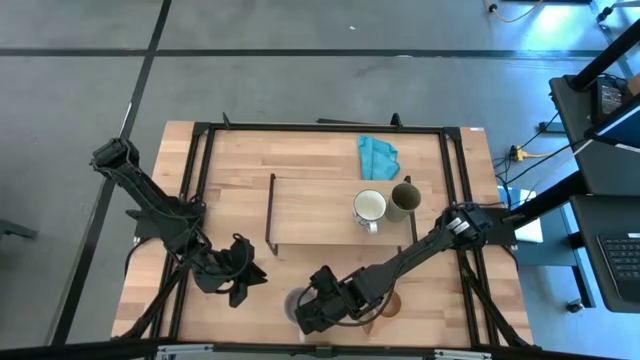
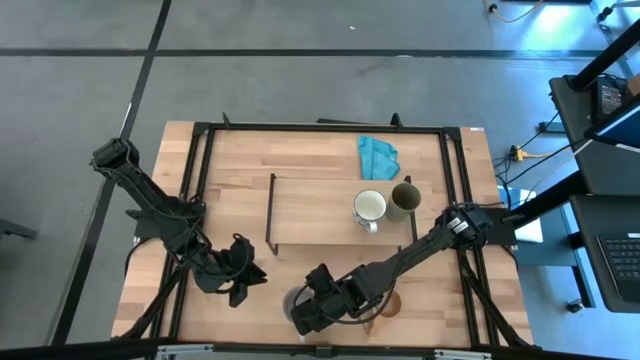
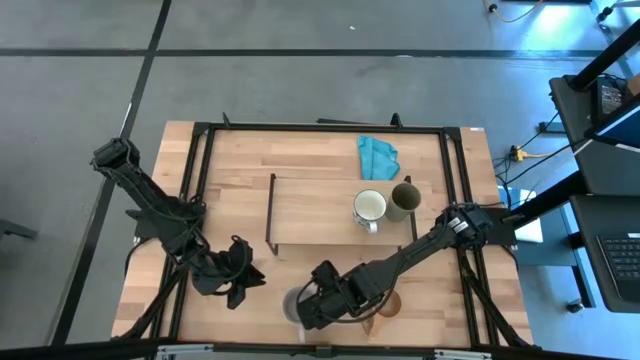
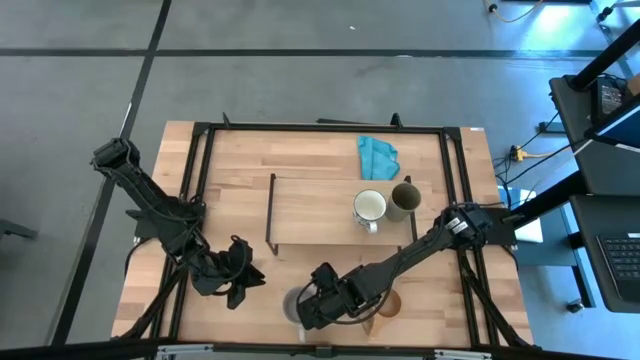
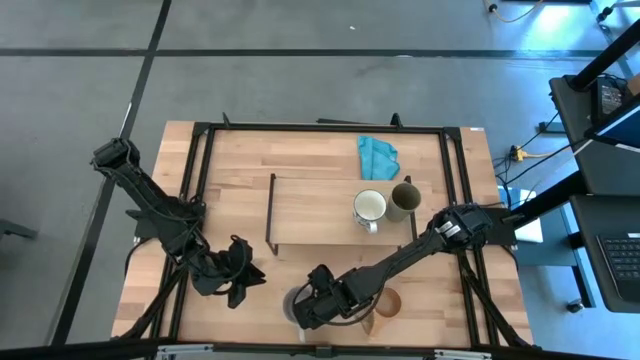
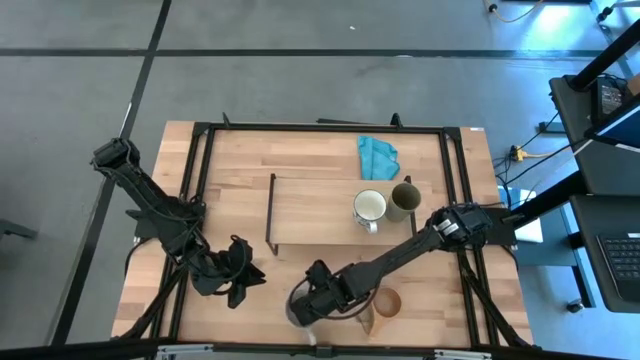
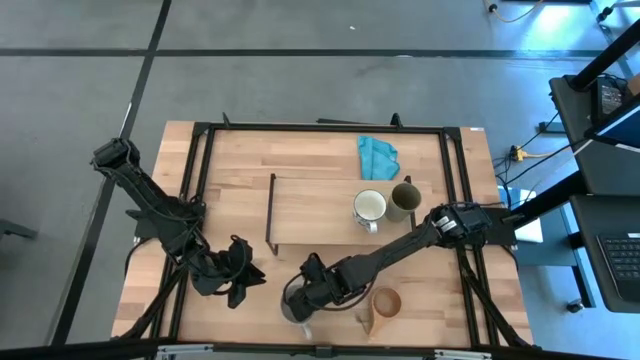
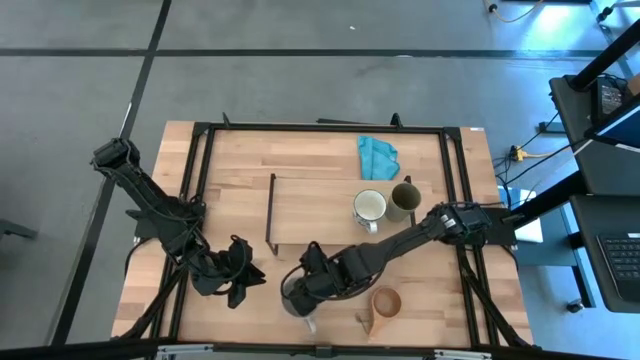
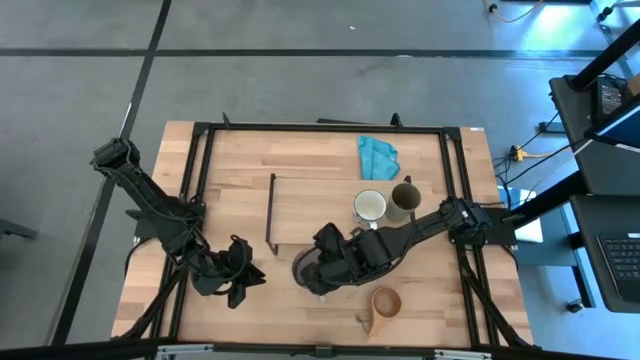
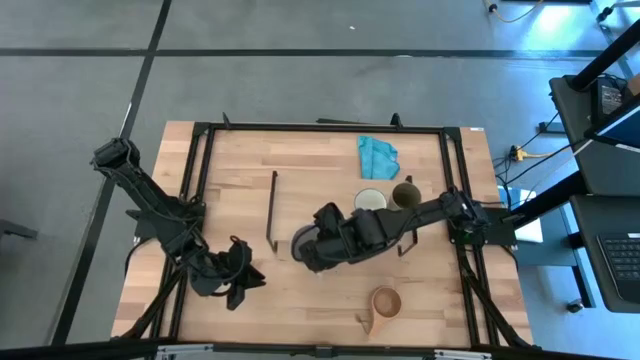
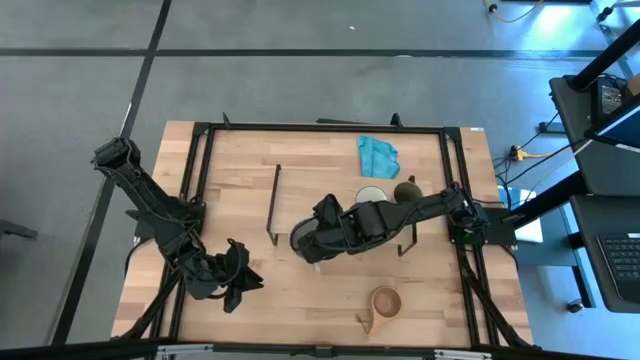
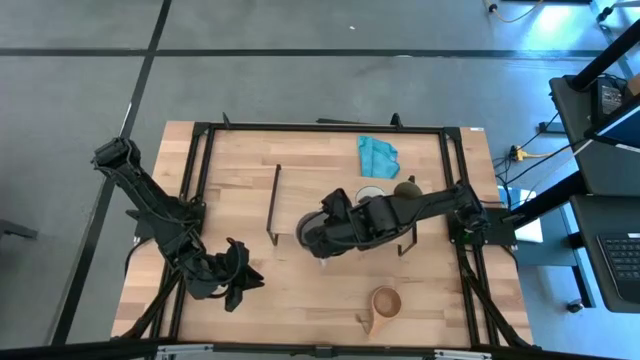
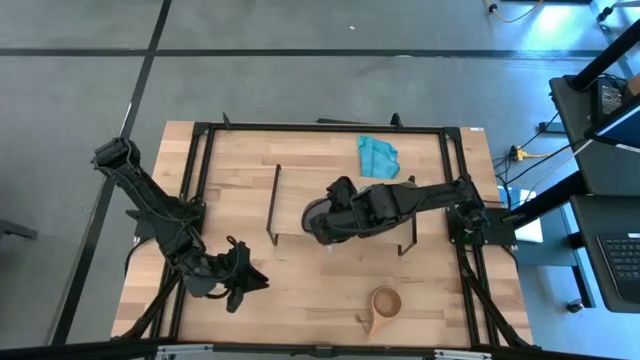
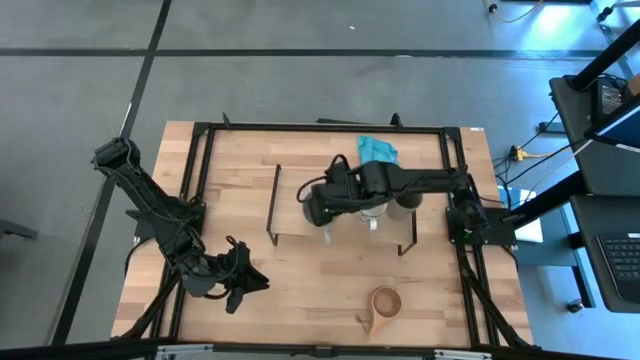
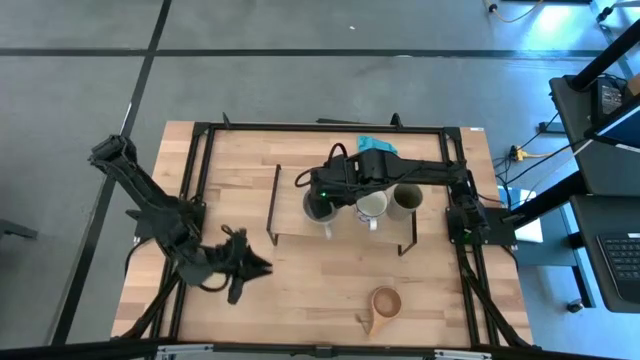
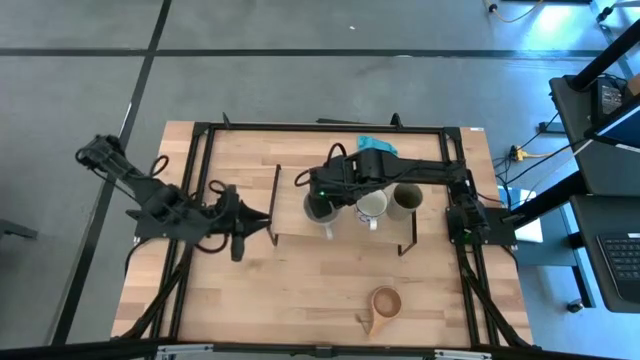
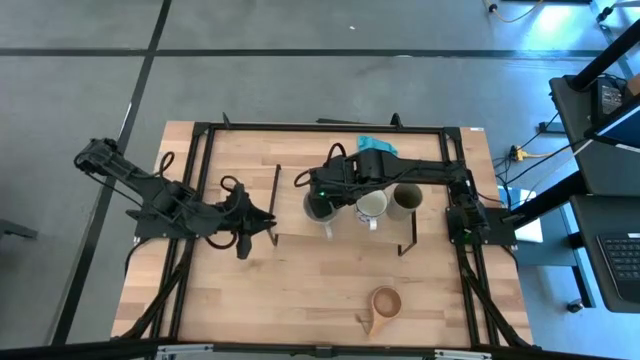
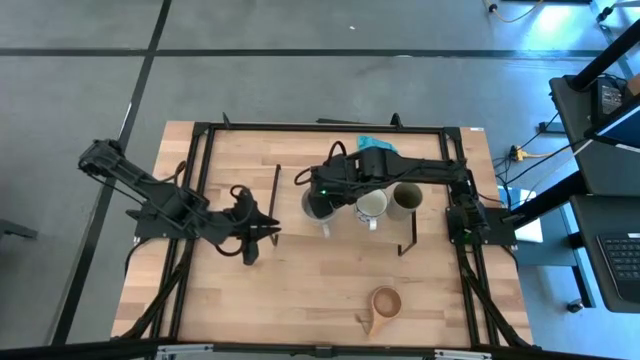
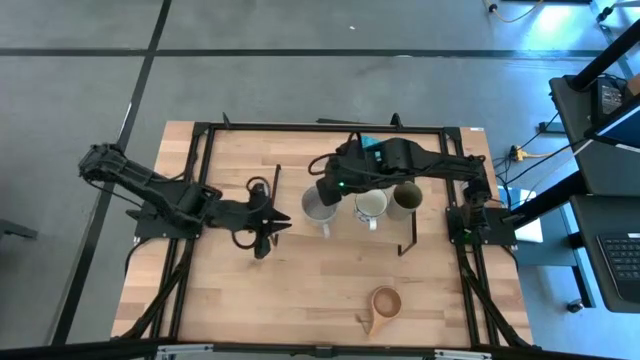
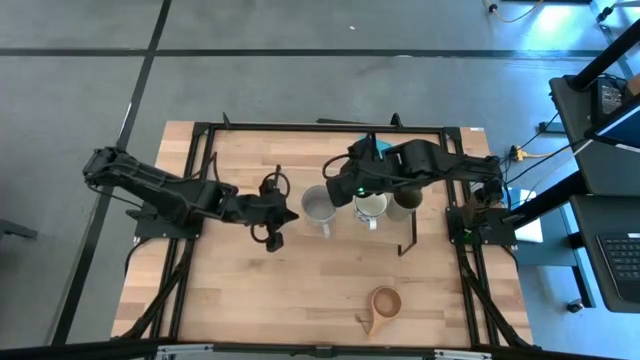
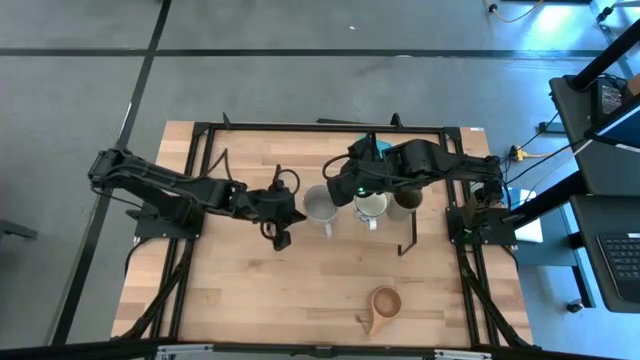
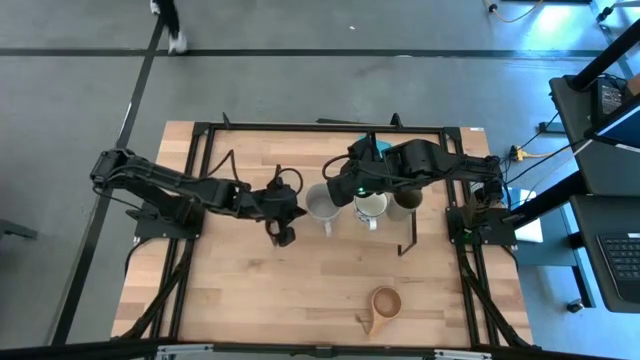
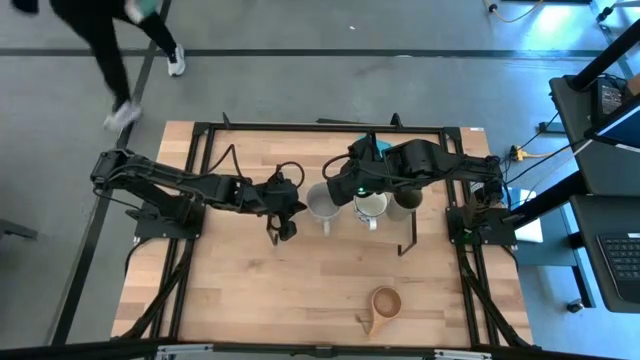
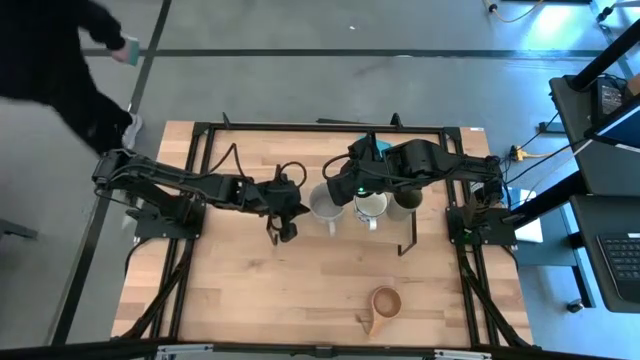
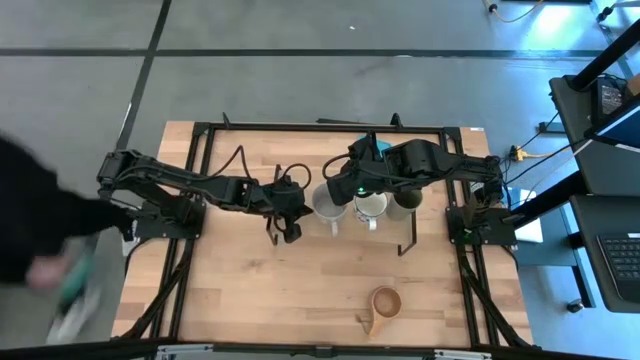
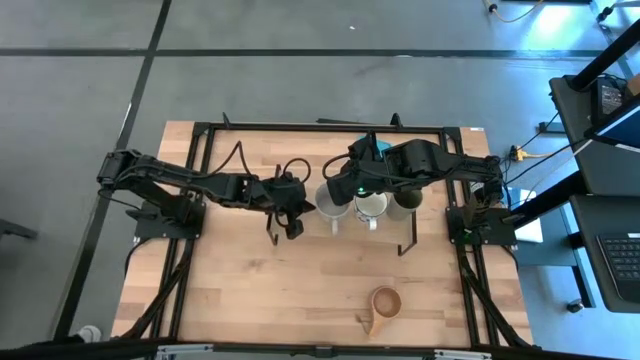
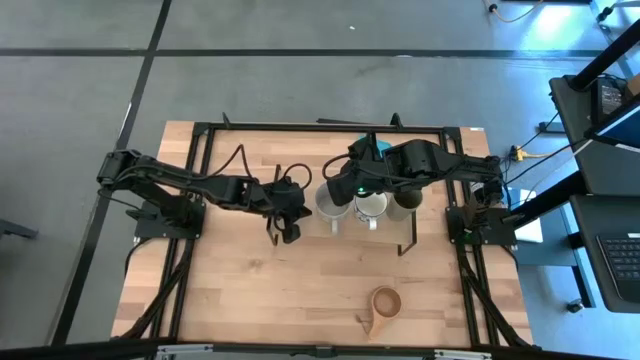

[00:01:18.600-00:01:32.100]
Task: Stack small to large cups/mugs on shelf
Put the gray mug on the shelf

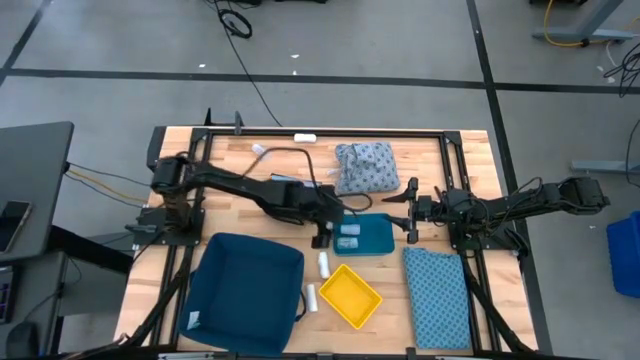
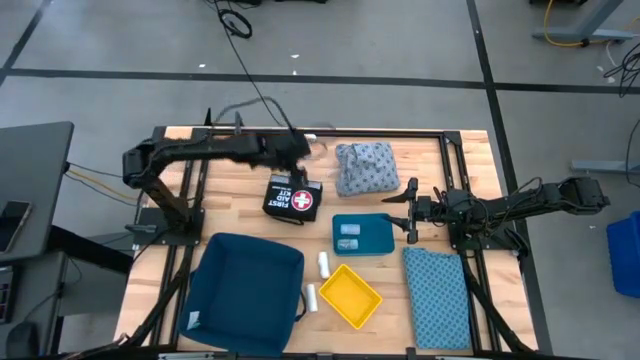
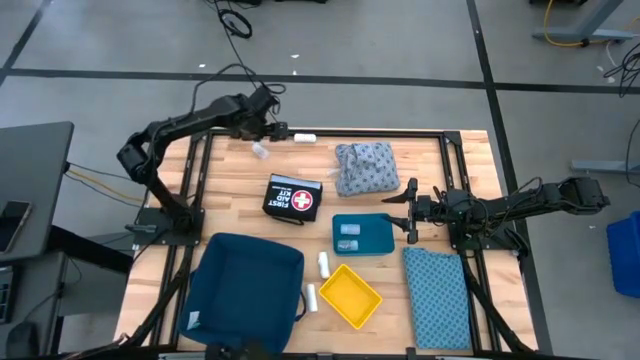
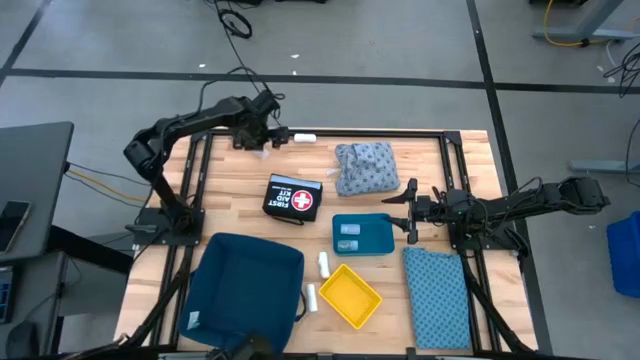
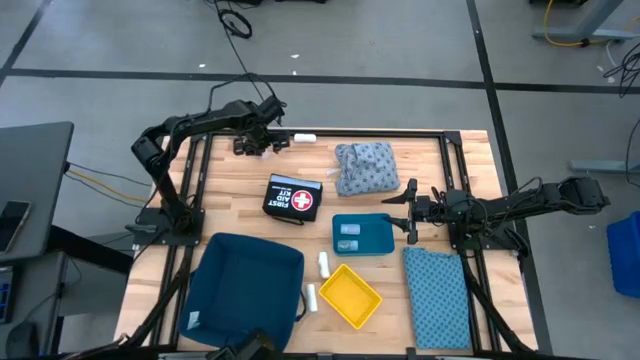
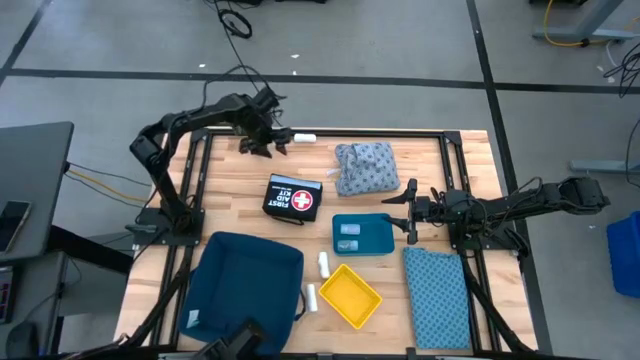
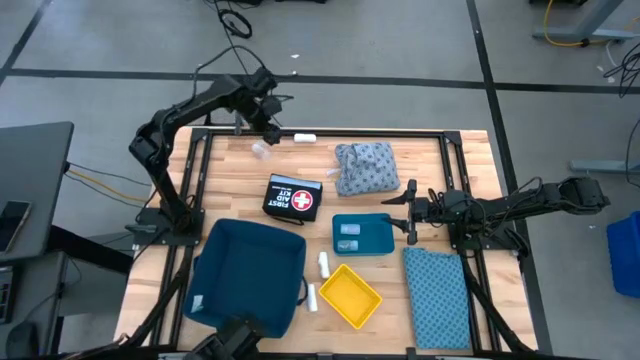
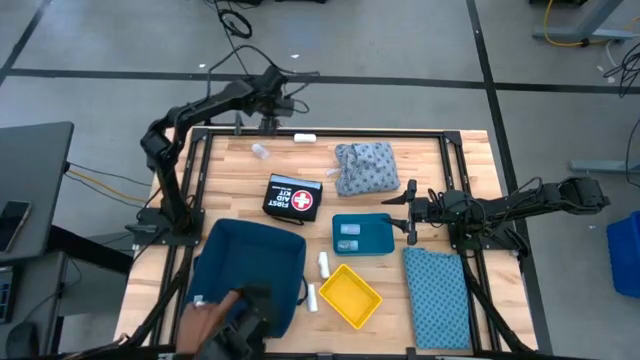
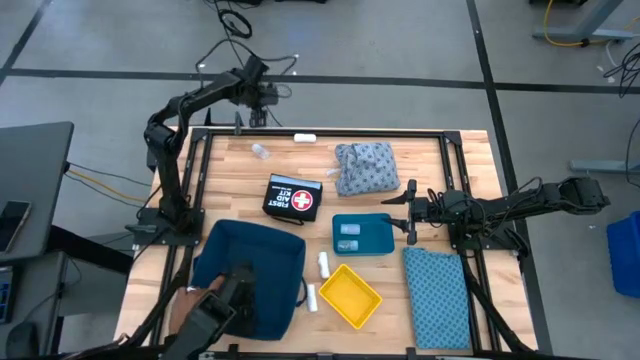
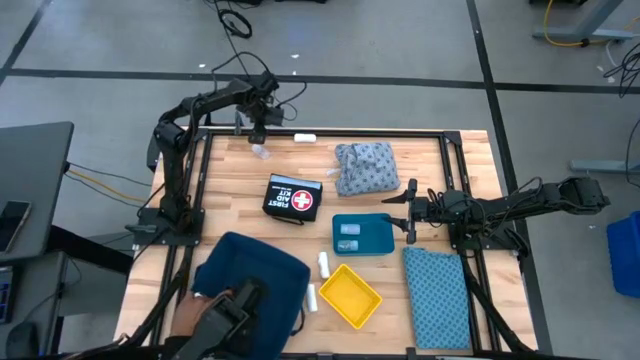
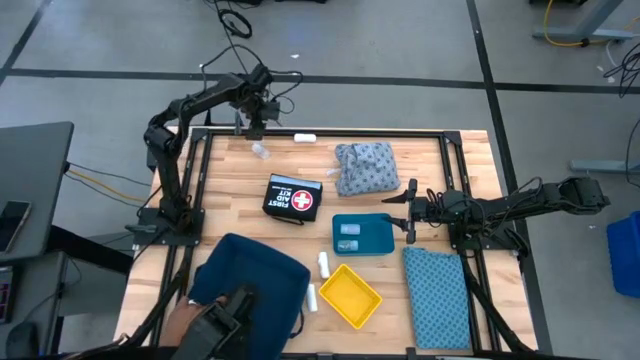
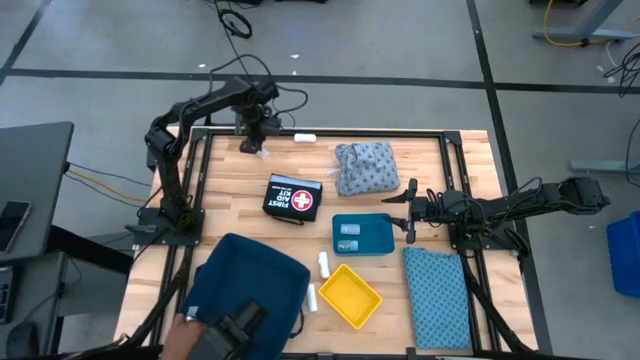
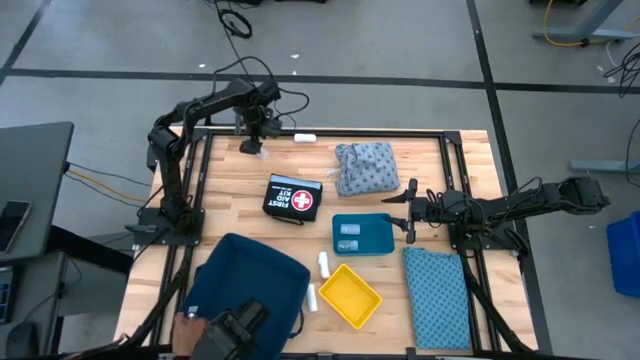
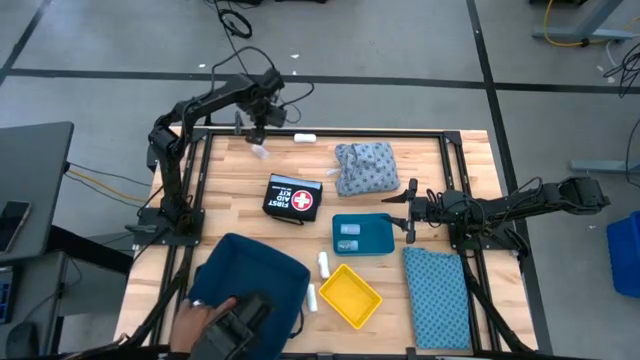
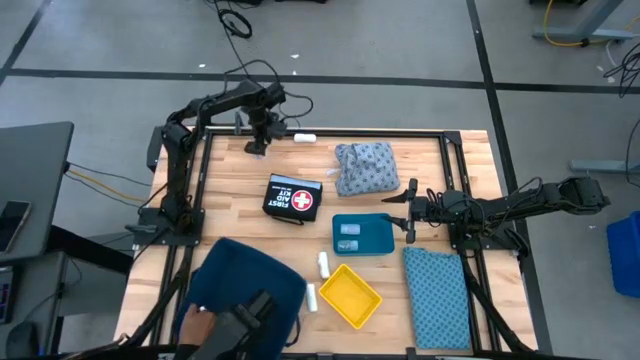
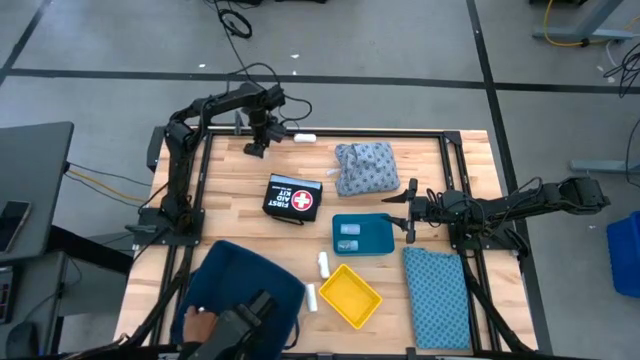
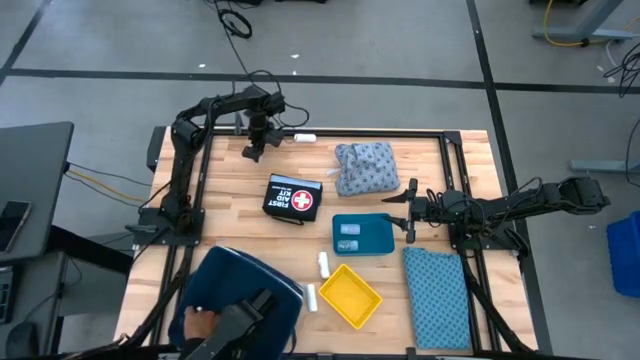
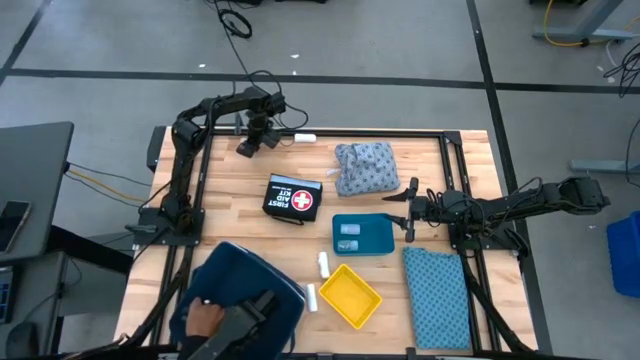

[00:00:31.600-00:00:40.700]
Task: Pick & place medical supplies in basket/bin
Put the pill bottle into the blue bin
